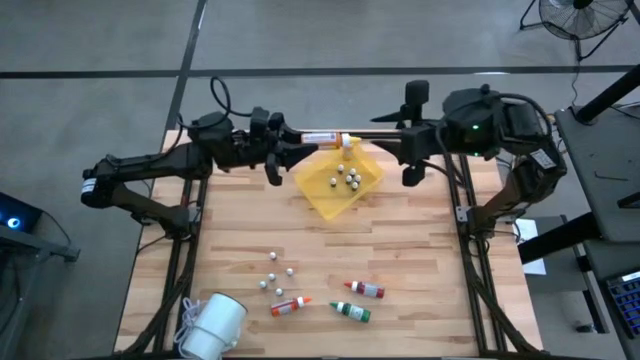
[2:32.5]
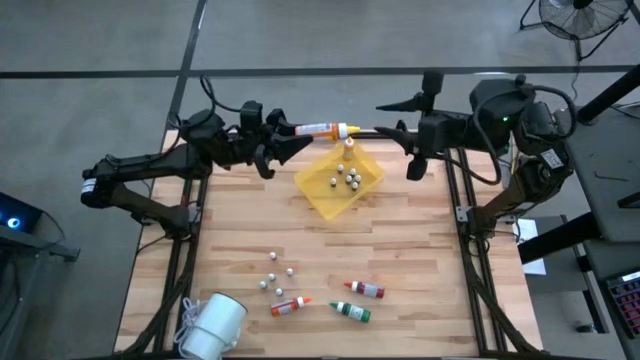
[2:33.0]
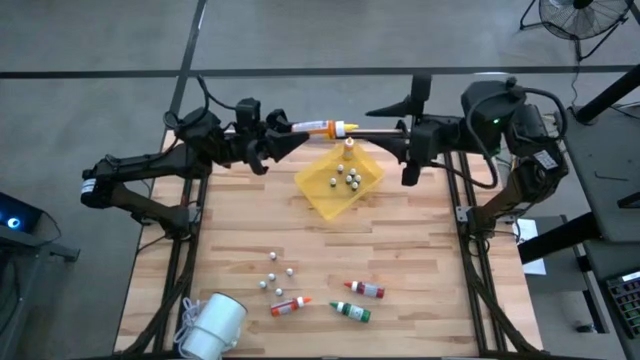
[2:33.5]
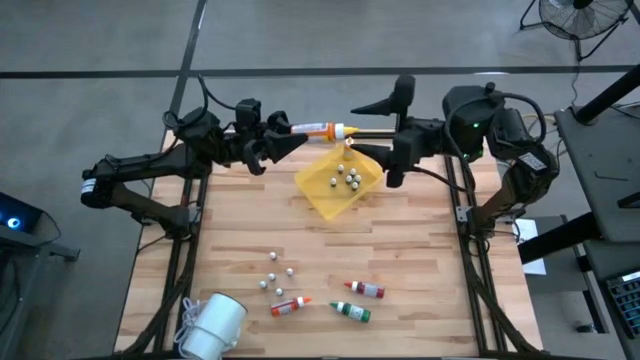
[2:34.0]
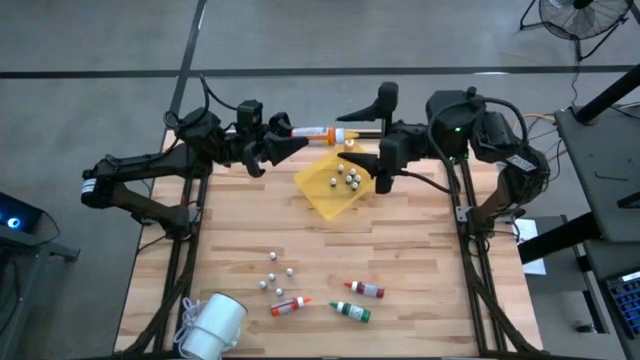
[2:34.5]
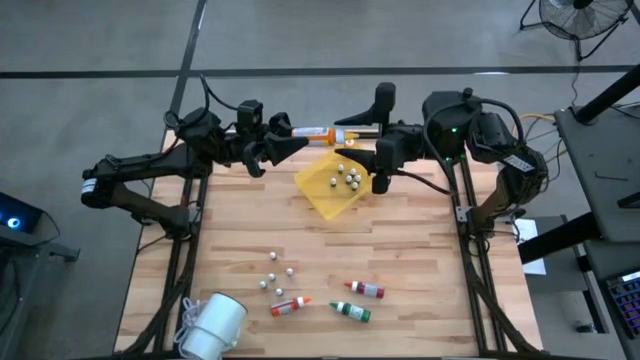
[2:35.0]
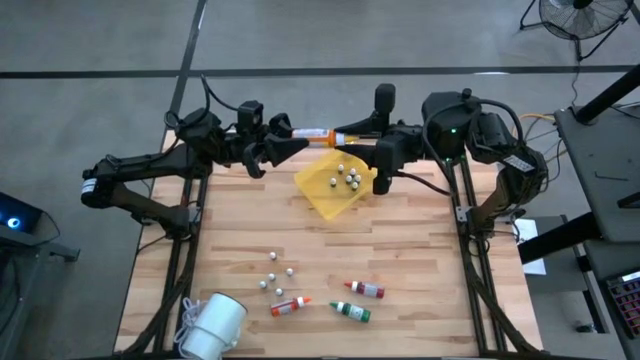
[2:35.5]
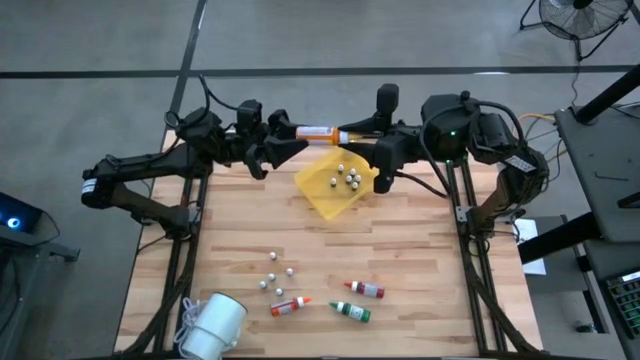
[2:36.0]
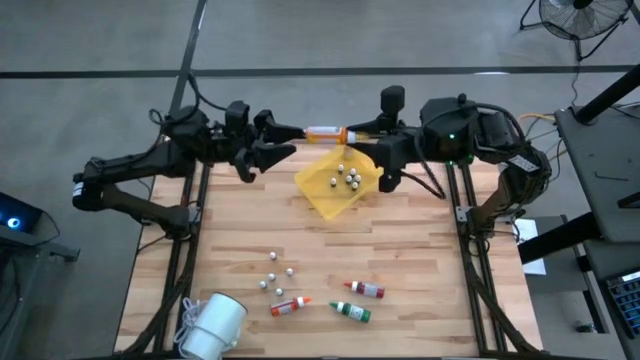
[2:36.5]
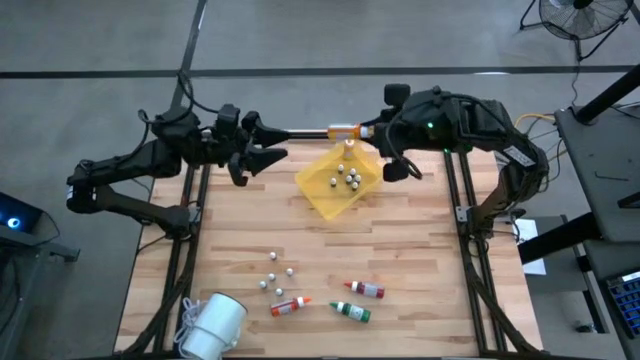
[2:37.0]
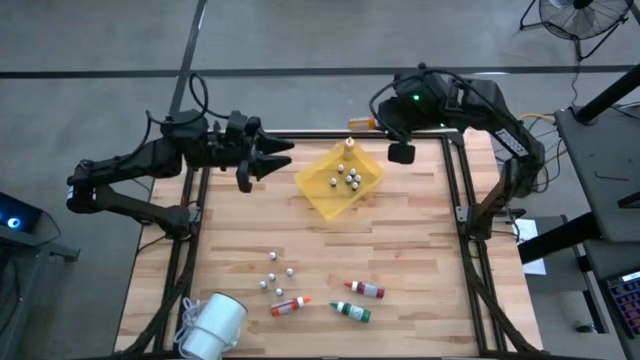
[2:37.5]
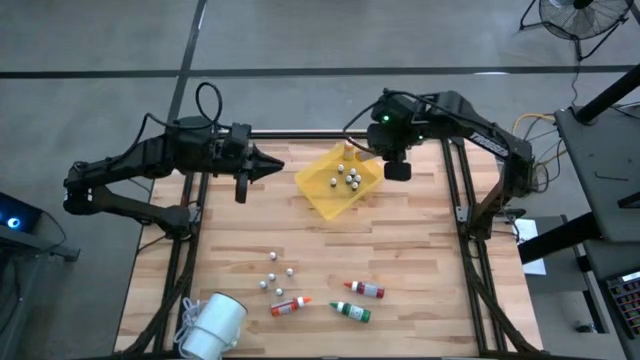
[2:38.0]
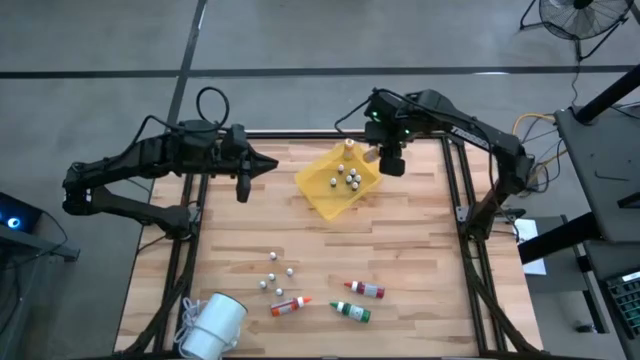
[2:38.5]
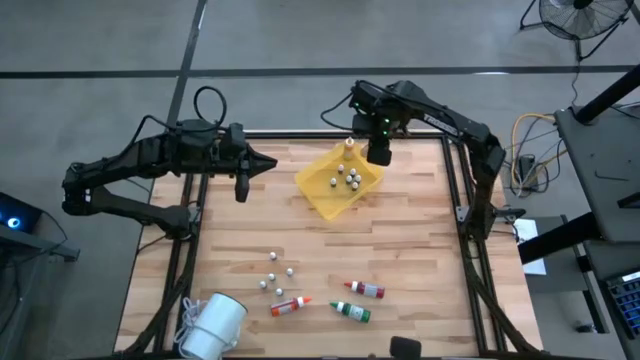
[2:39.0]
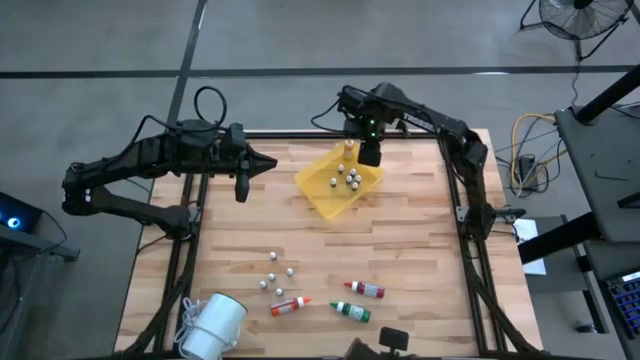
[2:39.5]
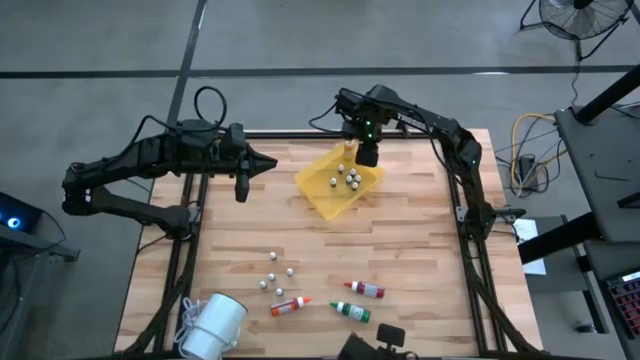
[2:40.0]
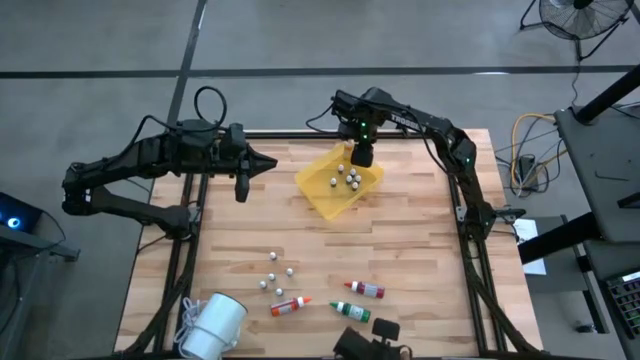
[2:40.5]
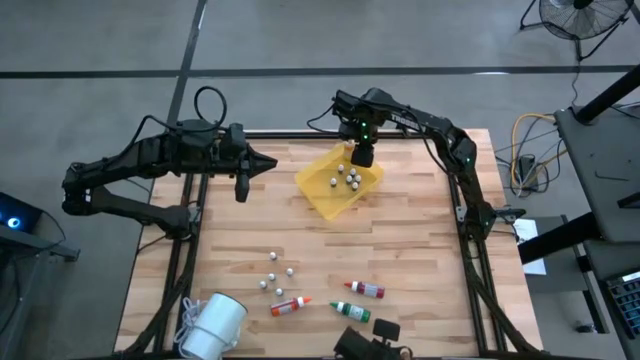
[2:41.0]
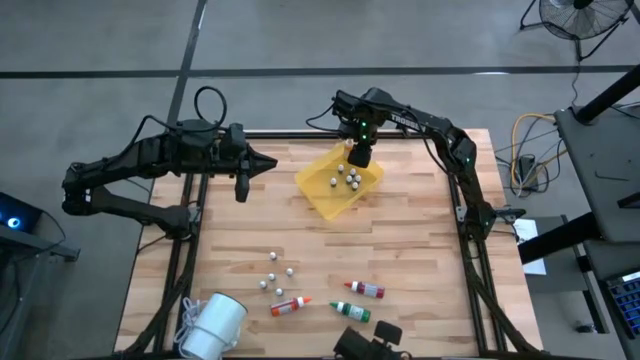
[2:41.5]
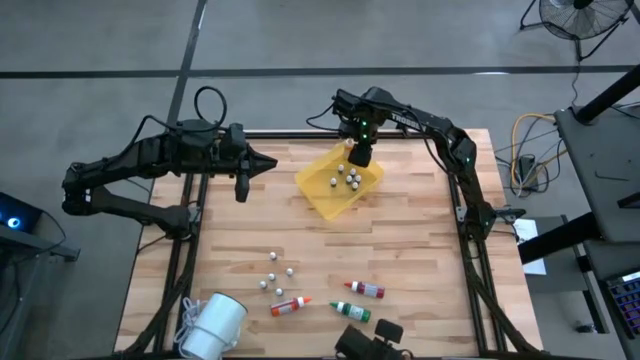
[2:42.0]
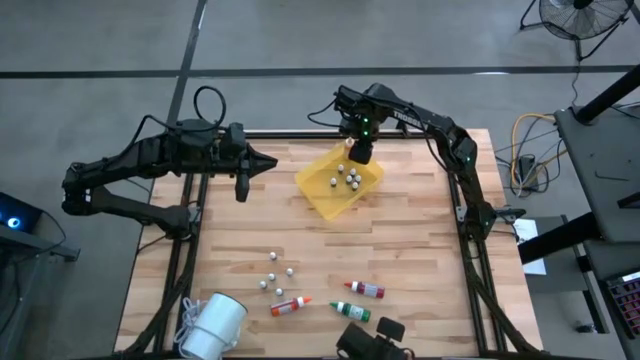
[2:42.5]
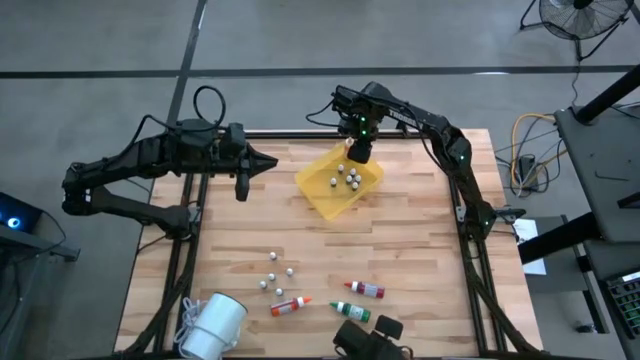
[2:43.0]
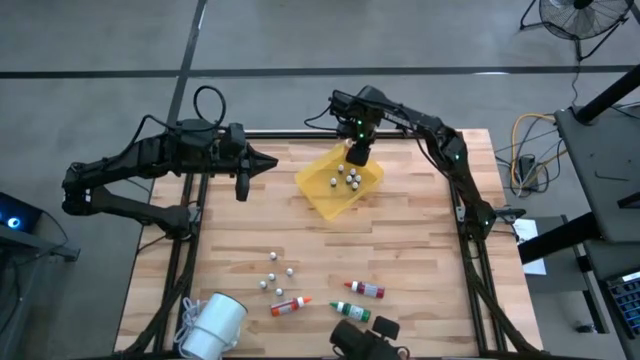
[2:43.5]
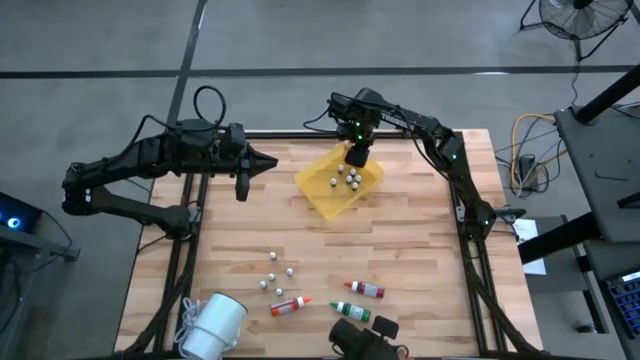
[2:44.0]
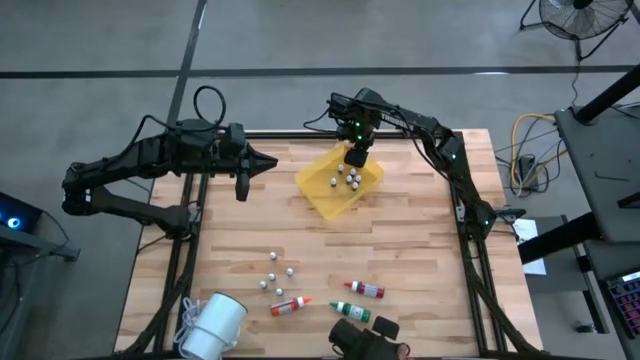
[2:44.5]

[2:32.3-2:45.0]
Task: Pick & Place food coloring
Put the large yellow food coloring bottle into the yellow bin
